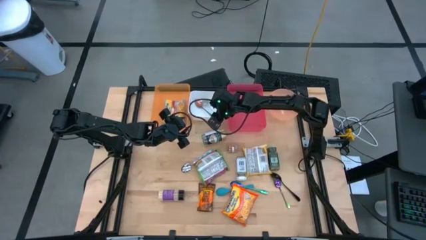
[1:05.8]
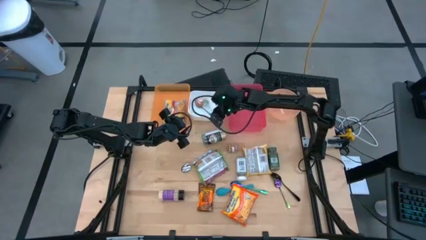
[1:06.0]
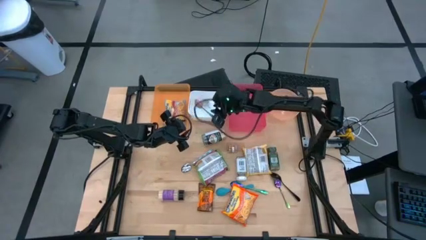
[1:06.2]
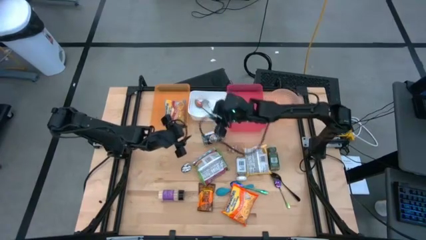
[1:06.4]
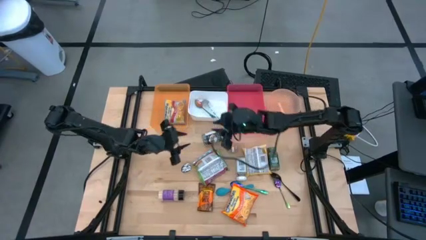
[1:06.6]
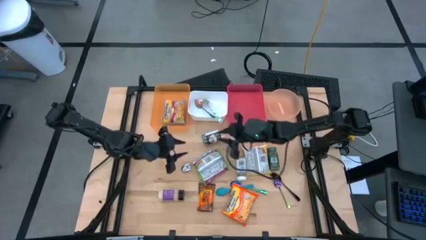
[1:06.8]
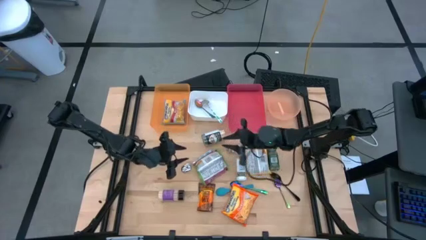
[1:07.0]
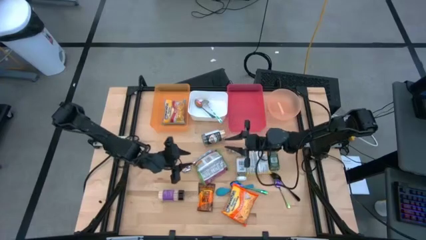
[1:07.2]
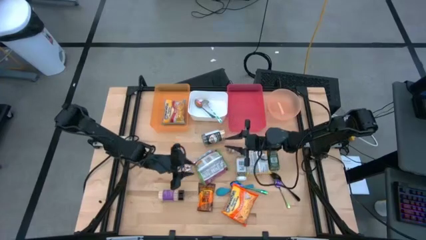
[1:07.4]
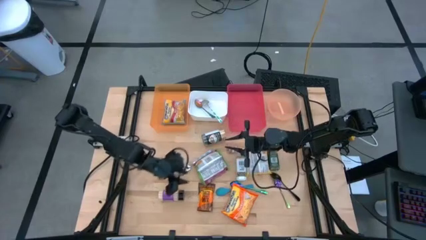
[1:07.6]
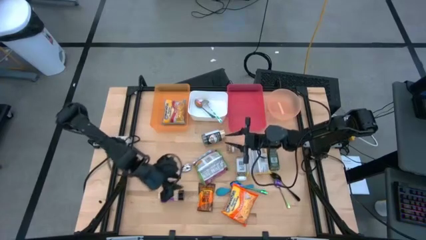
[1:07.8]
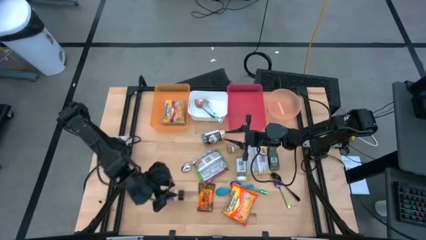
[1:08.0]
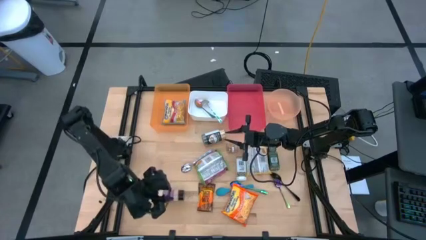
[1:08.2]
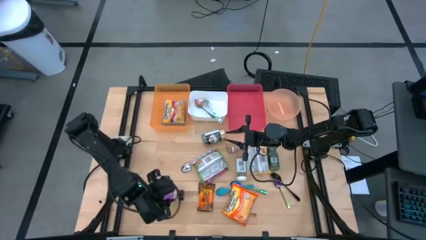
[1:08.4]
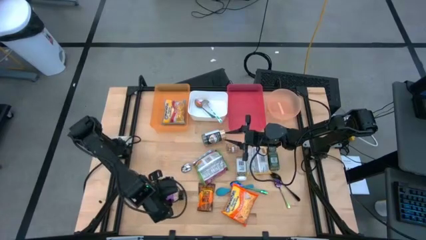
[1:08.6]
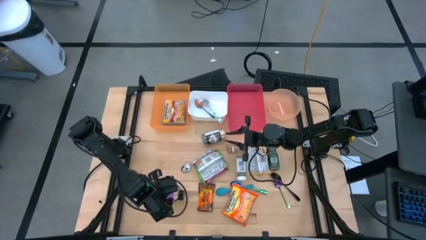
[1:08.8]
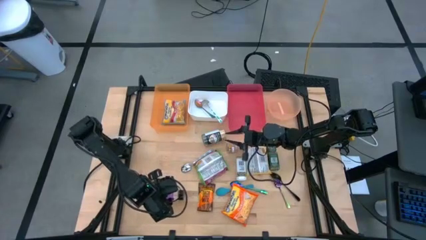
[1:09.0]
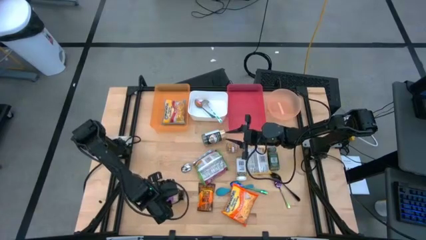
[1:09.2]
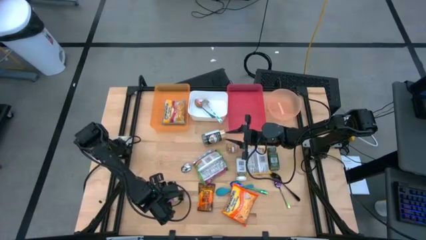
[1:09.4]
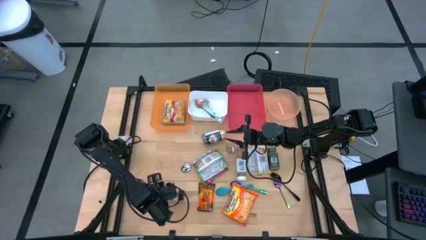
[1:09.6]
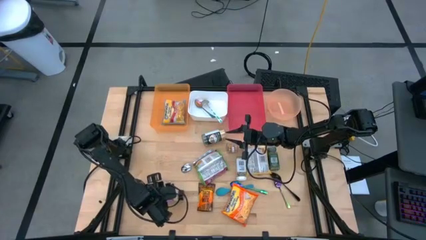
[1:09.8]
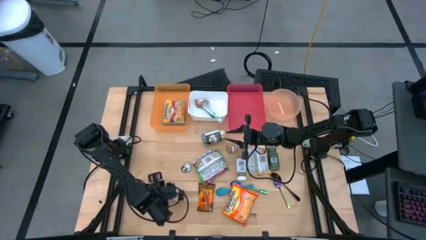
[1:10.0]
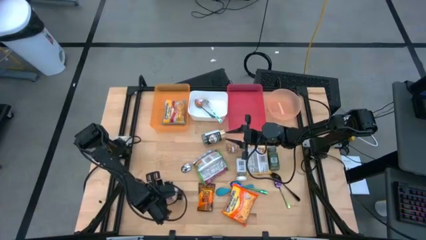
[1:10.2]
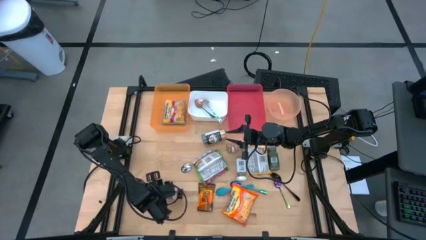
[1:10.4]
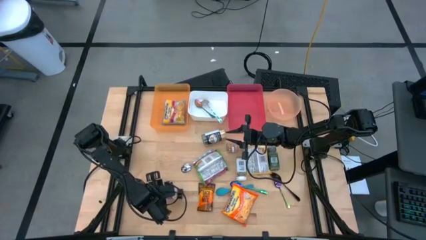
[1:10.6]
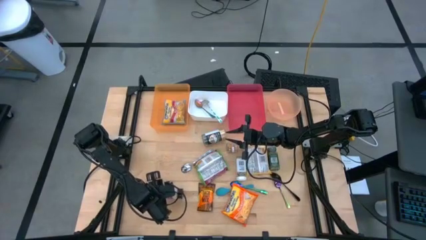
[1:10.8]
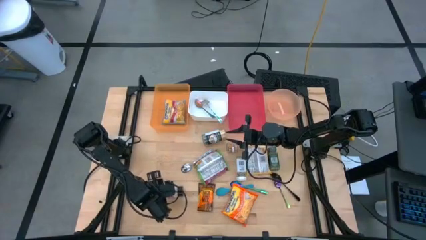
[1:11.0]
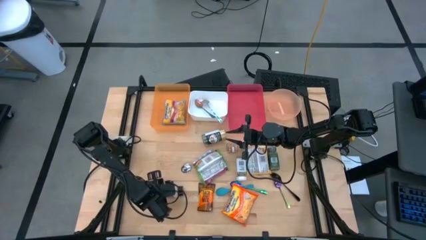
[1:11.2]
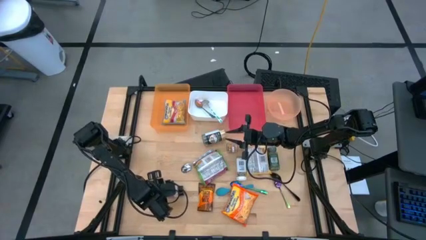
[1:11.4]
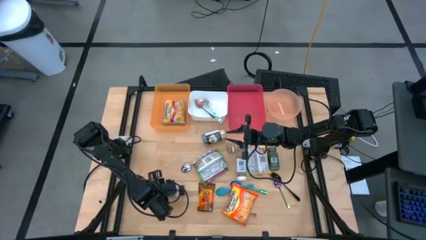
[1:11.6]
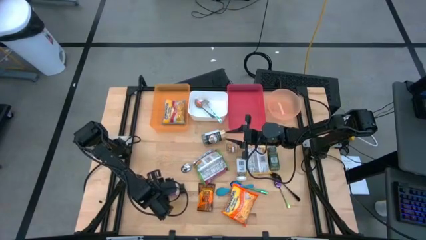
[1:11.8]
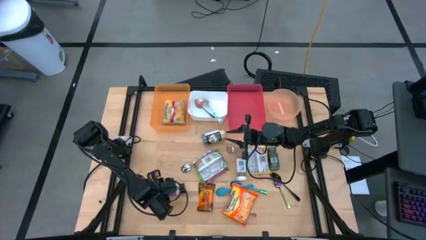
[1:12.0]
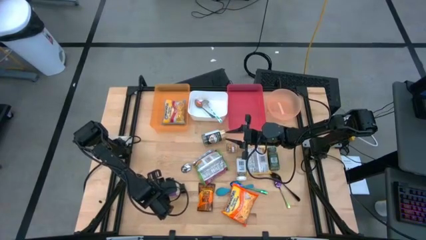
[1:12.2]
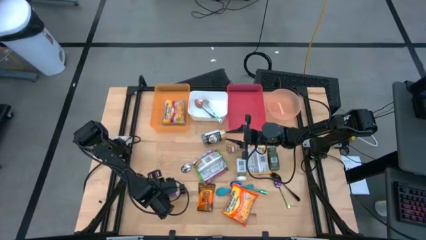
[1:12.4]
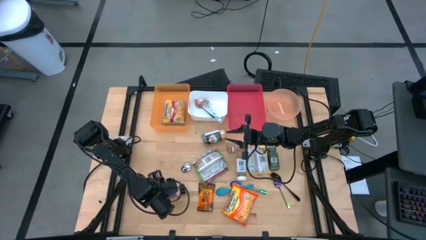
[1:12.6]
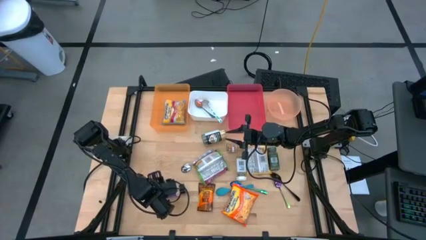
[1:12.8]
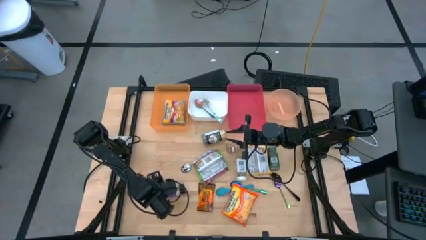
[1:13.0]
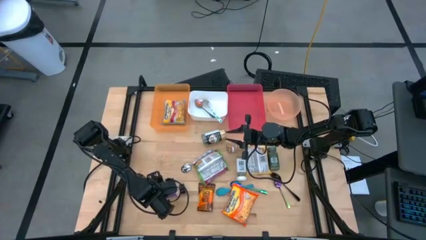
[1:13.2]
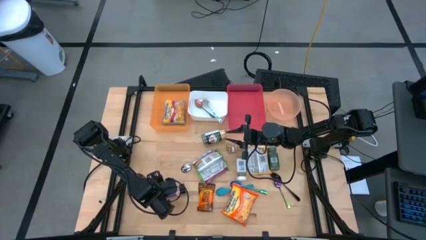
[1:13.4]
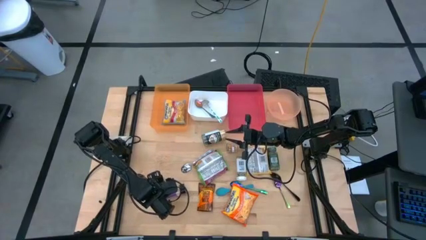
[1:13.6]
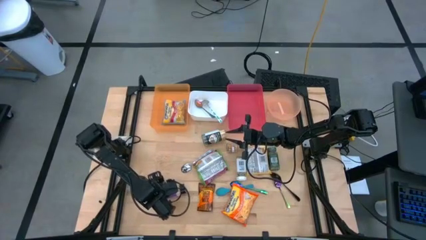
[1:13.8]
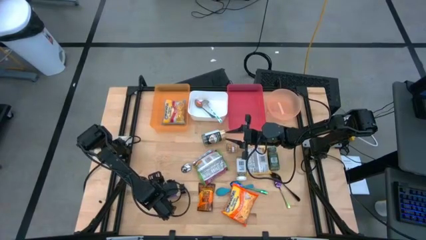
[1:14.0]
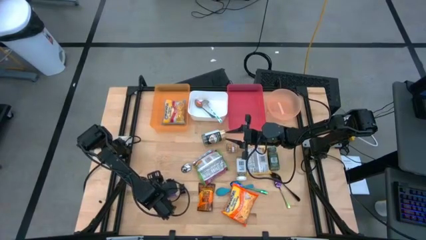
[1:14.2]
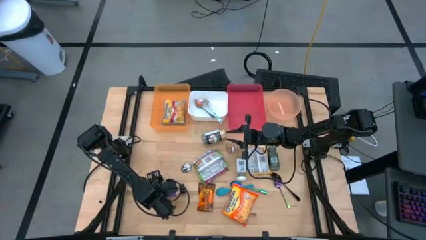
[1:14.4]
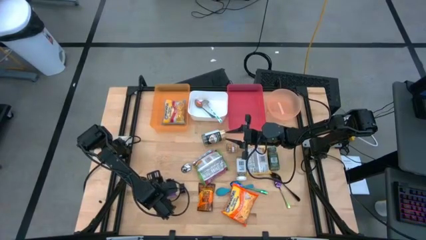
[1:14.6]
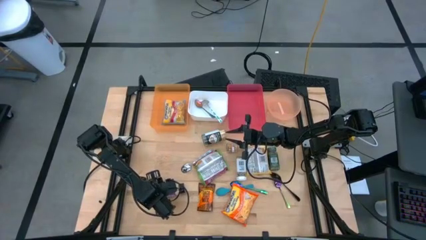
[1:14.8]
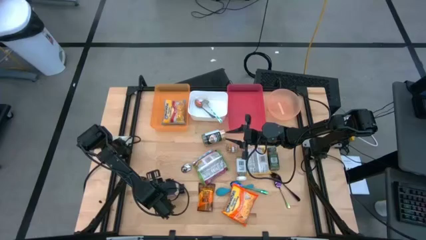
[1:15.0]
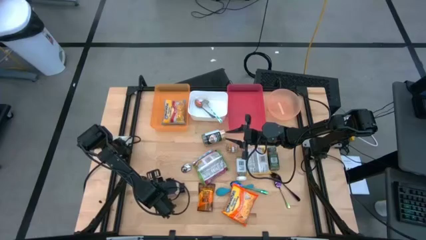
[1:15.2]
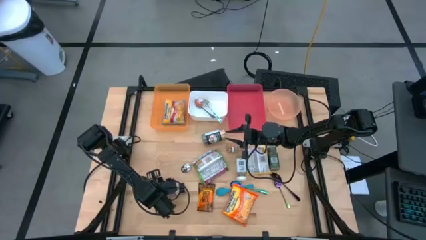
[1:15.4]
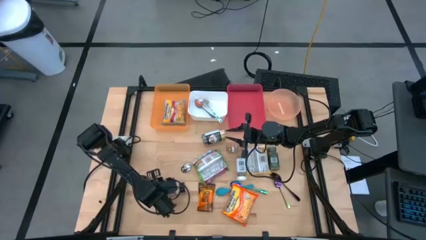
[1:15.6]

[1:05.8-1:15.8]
Task: Pick & Place Food Item
Put the purple seasoning bottle into the red bin
